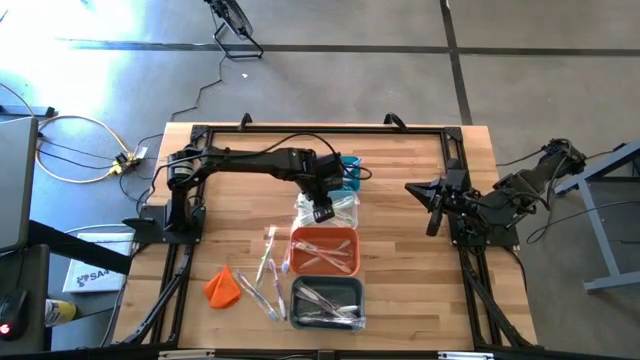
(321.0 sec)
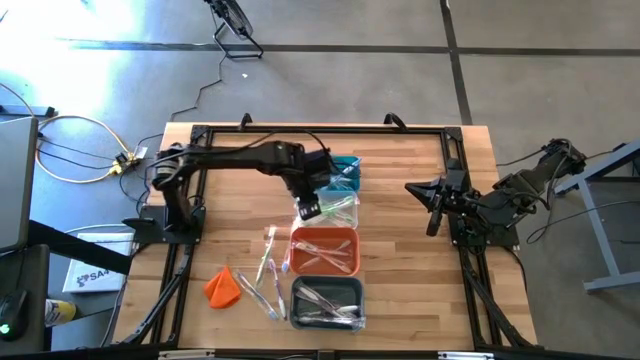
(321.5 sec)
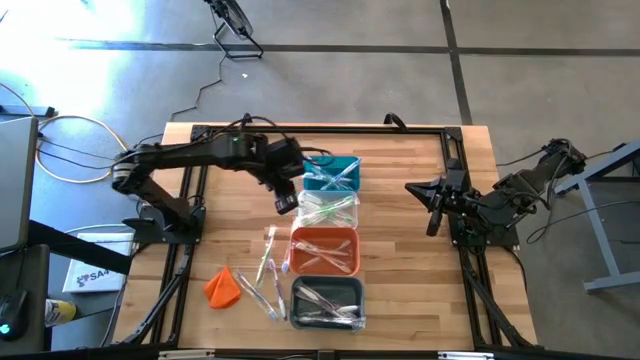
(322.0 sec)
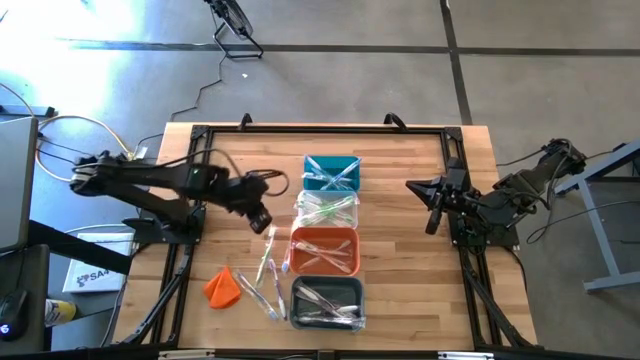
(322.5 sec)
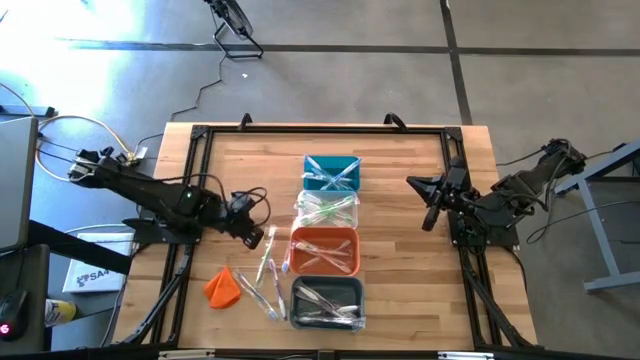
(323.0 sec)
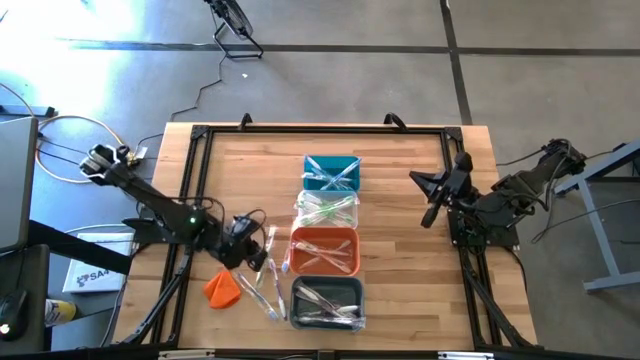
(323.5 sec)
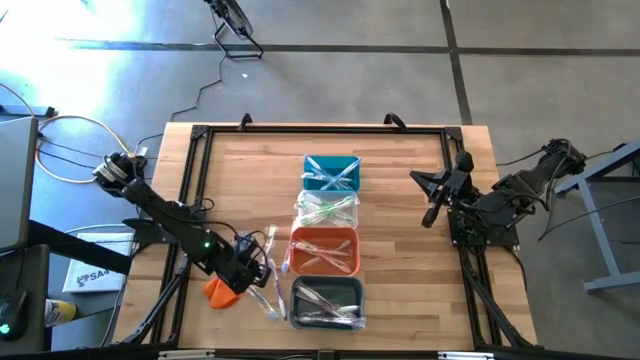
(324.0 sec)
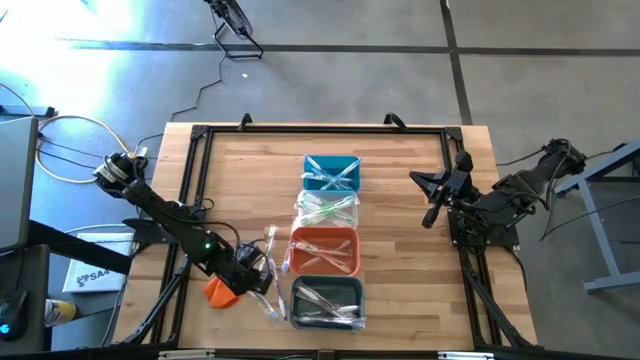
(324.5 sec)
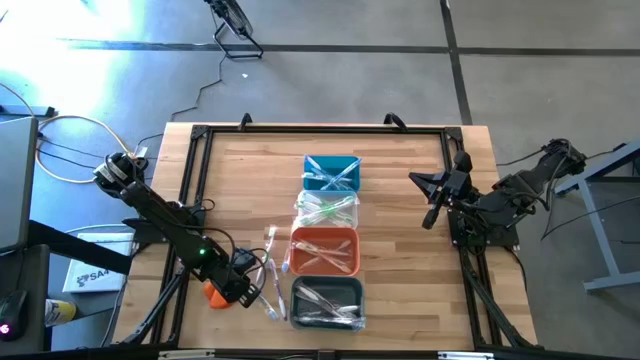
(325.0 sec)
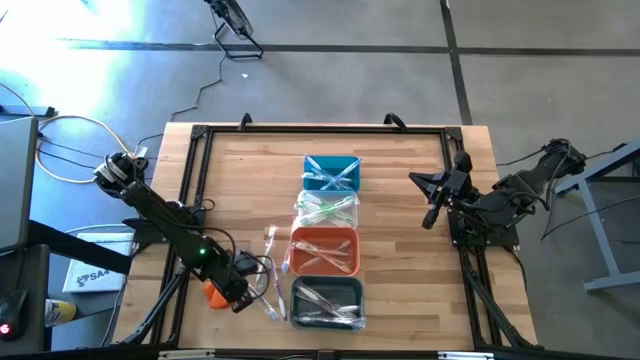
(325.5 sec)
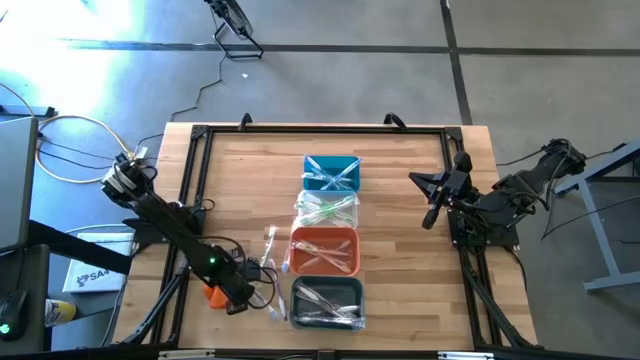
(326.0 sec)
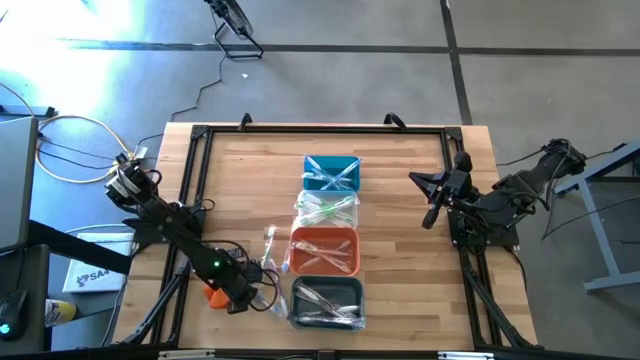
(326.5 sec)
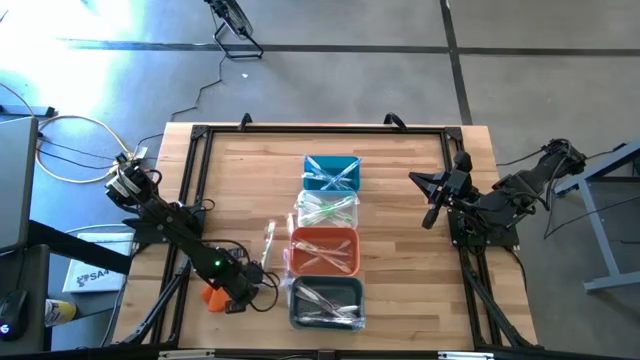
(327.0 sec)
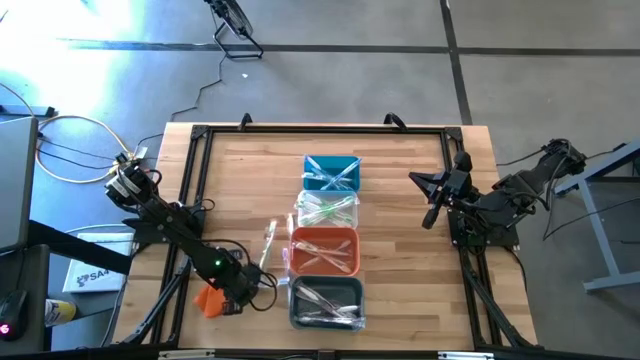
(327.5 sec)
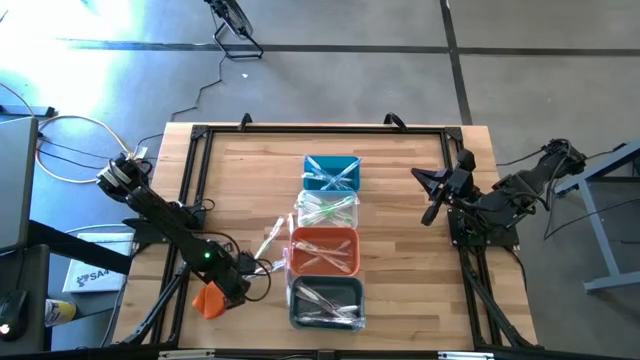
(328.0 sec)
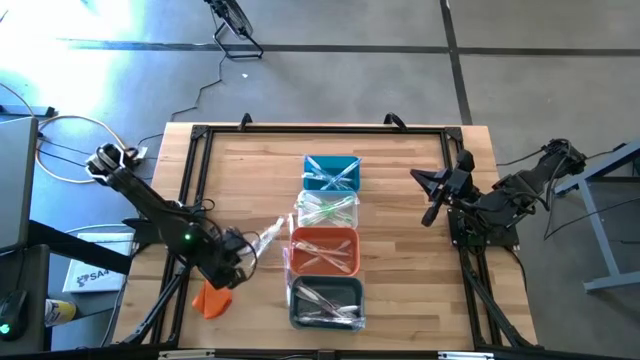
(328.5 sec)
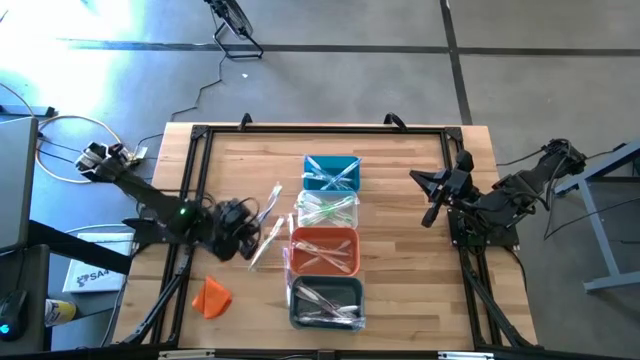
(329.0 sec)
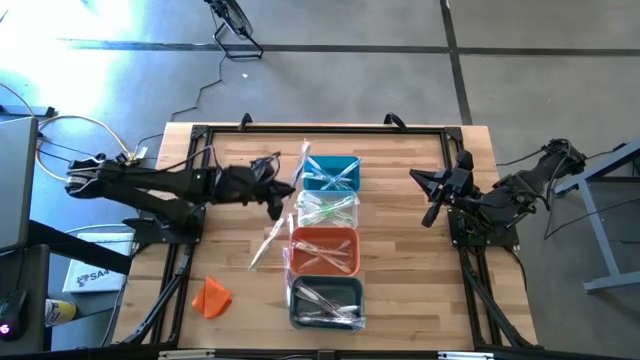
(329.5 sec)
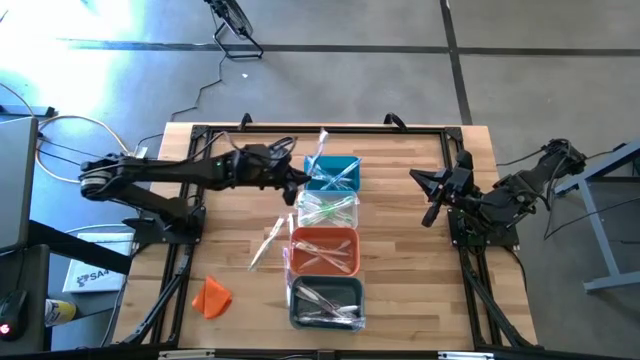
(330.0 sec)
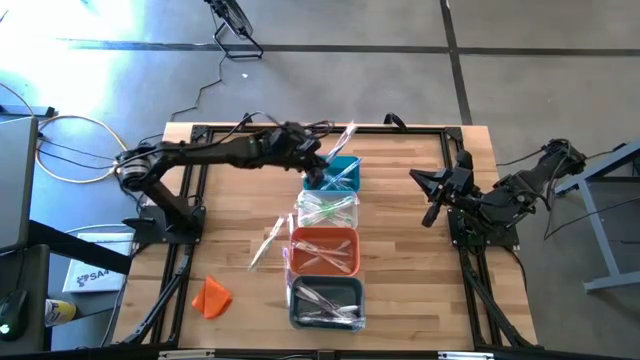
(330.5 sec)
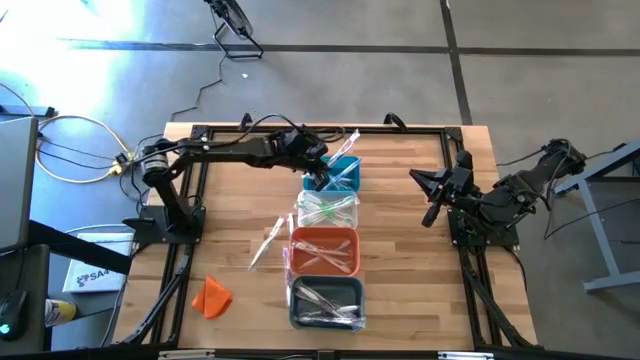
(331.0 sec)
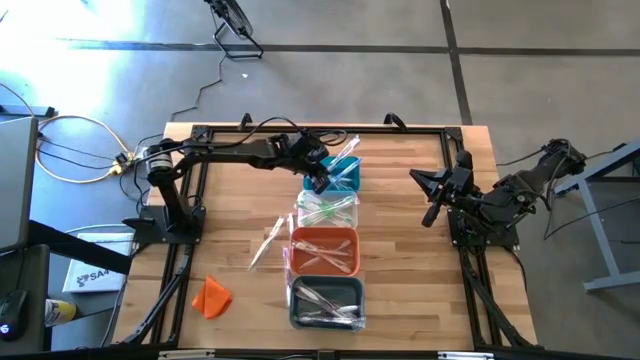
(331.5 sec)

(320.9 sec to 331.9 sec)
Task: Pick & Place Toothbrushes
Put the blue toothbrush into the blue bin

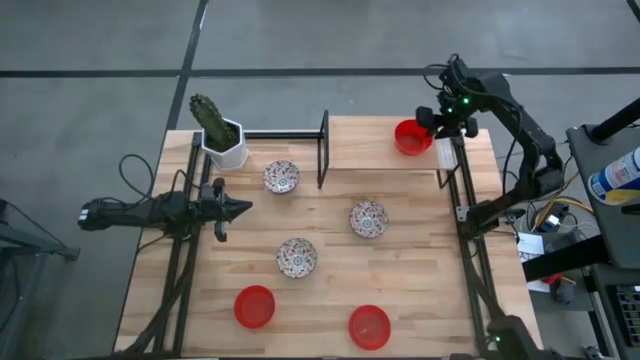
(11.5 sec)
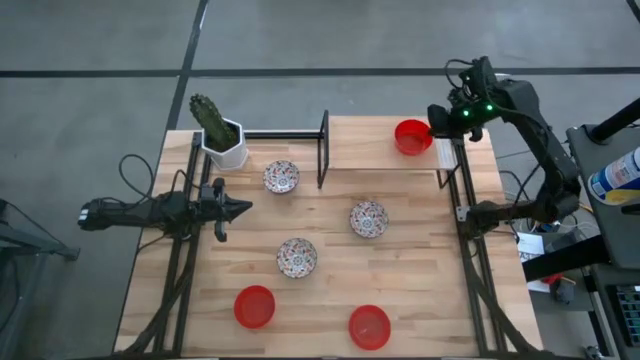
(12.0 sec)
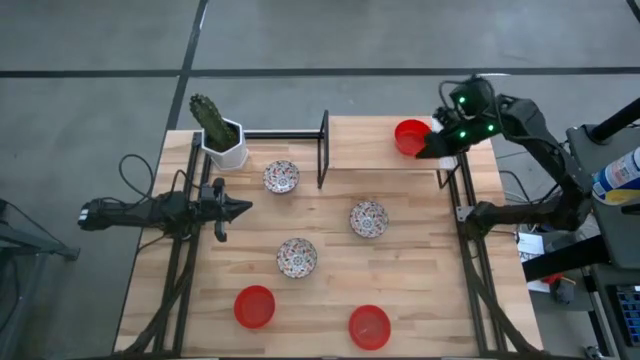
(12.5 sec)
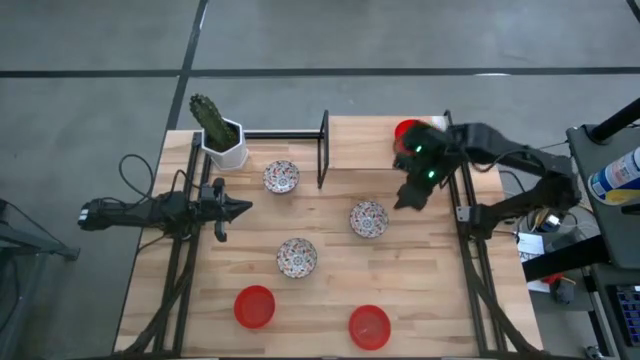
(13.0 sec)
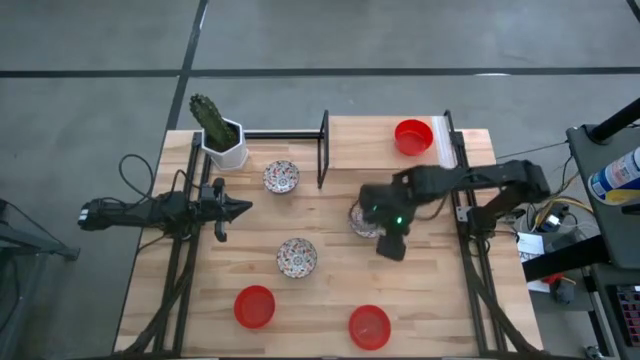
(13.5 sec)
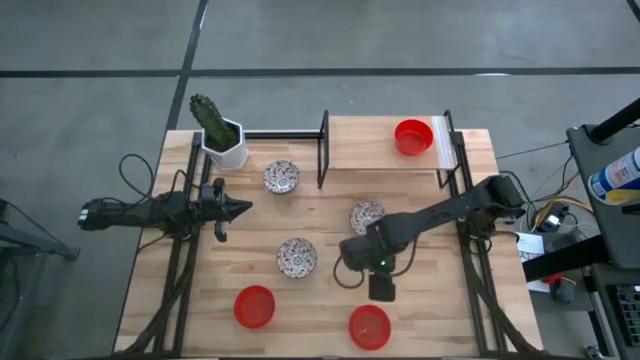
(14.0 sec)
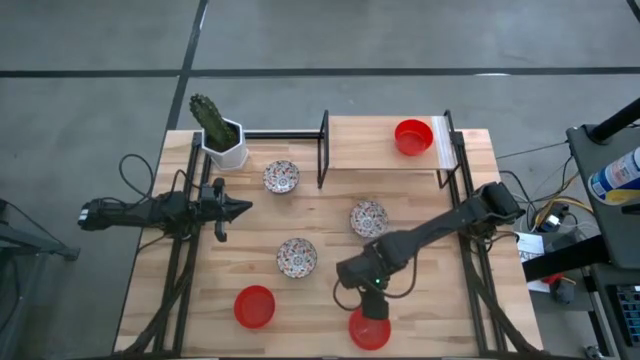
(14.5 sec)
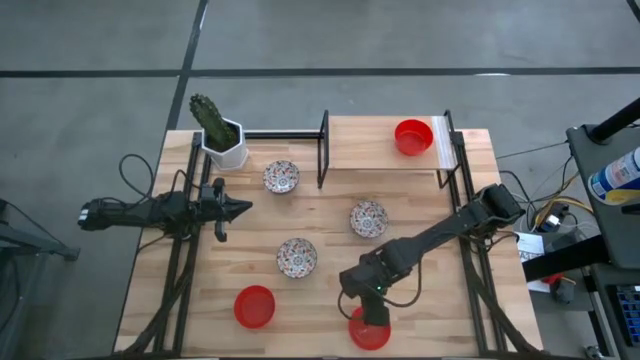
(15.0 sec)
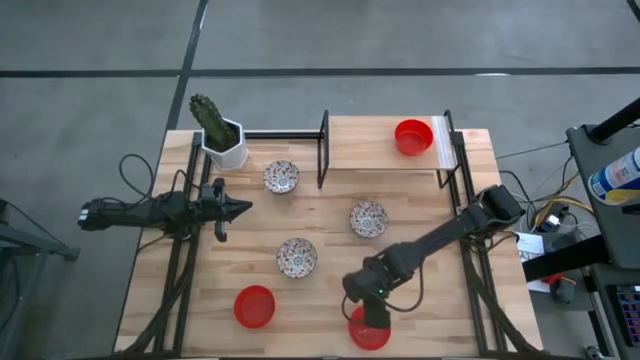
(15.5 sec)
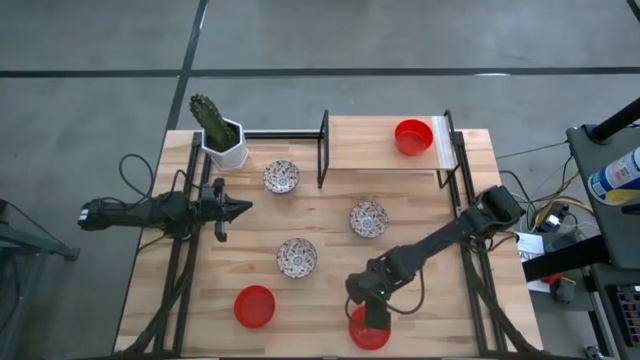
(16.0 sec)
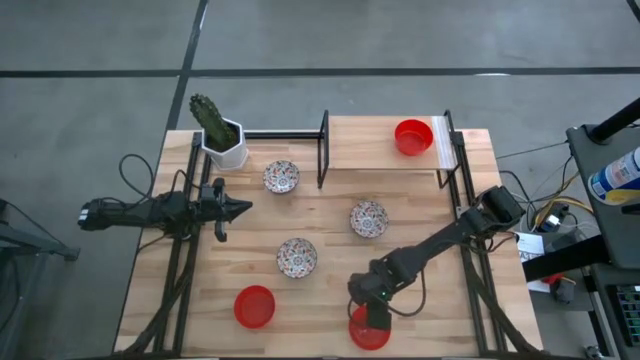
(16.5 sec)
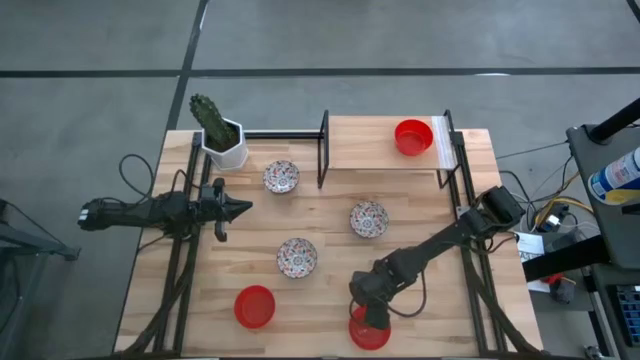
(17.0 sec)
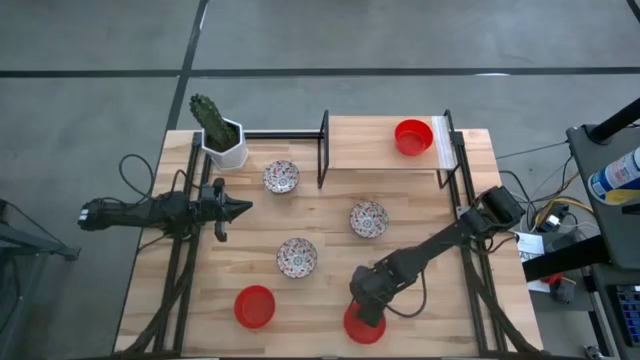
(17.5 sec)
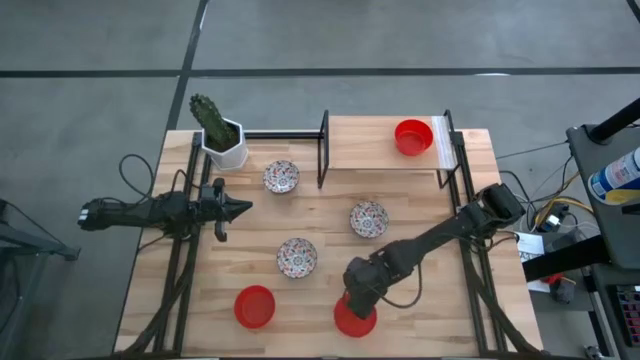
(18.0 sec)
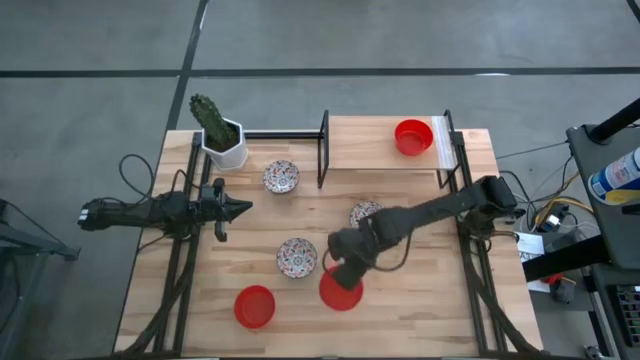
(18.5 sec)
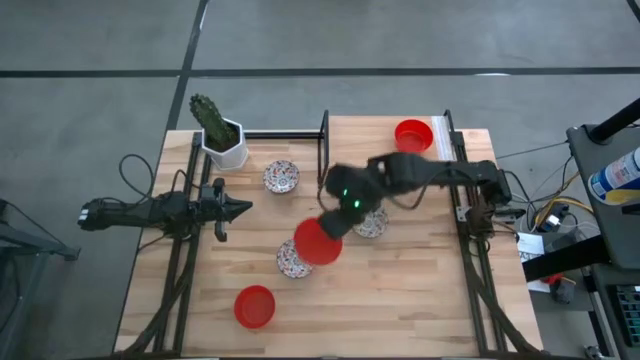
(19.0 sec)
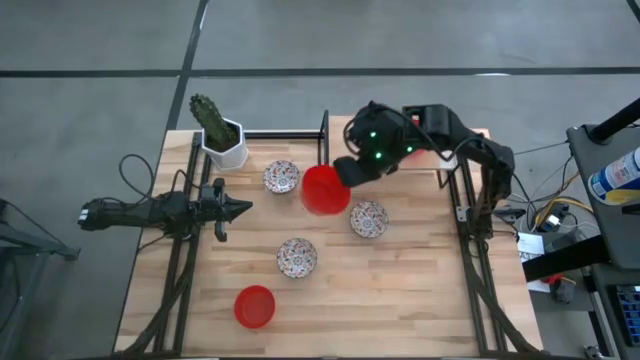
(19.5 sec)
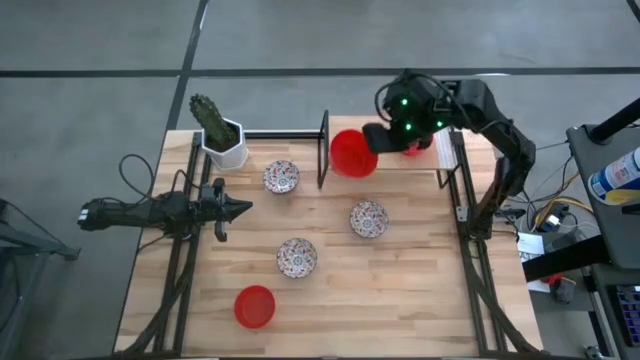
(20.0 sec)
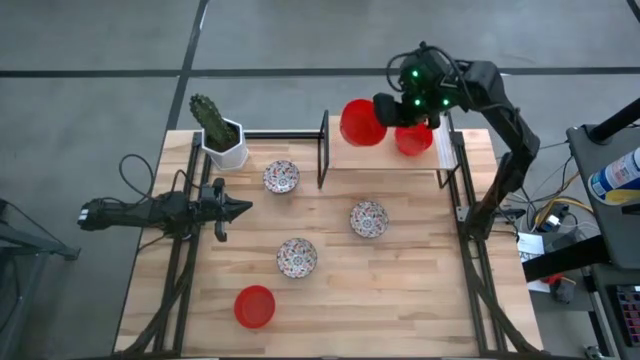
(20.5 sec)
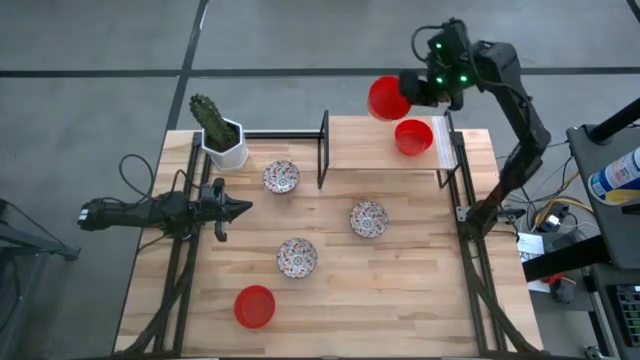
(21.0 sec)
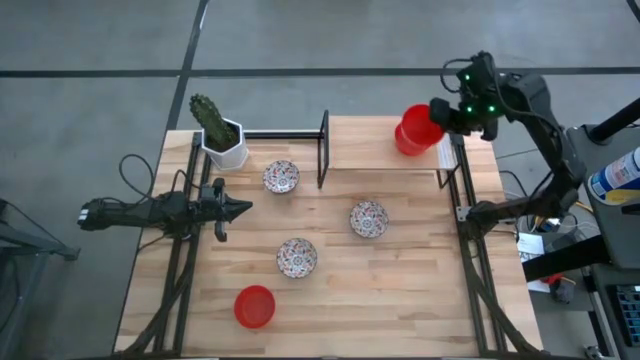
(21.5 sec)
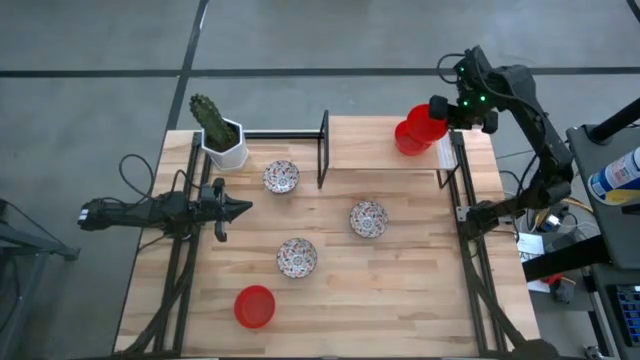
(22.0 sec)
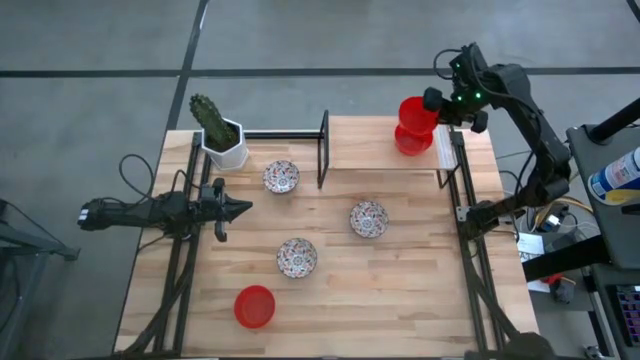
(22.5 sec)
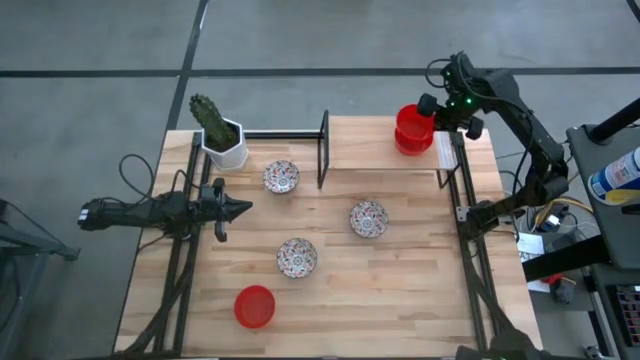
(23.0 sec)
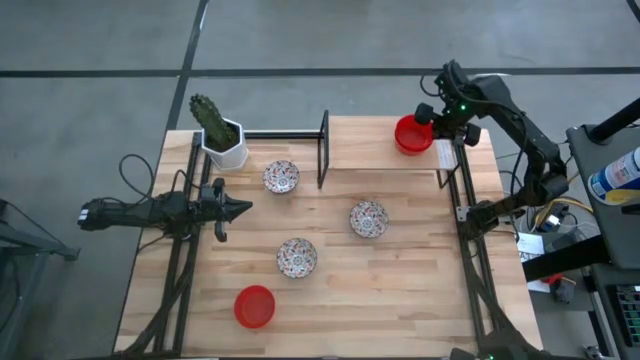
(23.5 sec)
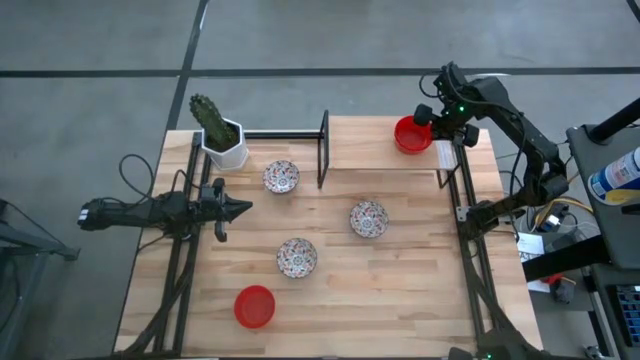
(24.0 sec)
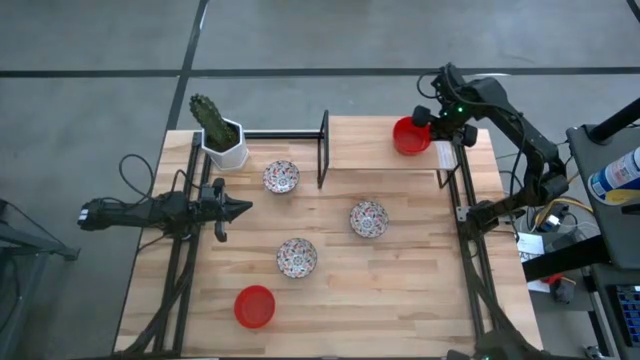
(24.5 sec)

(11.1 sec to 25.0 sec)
Task: Pick & Place Mini bowls
Stack the red bowl on top of the other red bowl on the shelf
